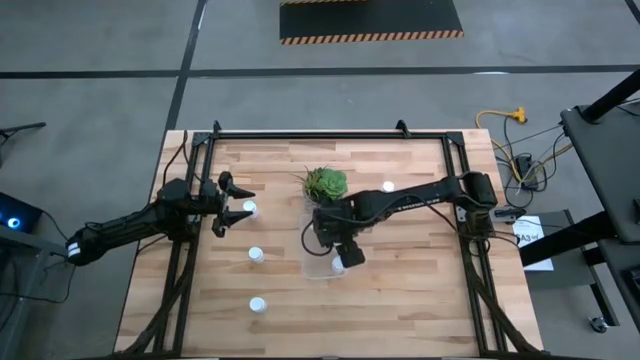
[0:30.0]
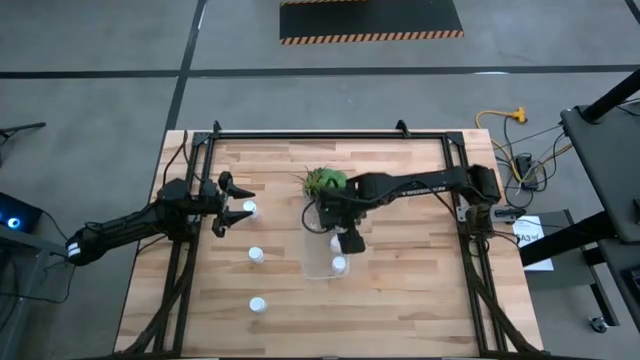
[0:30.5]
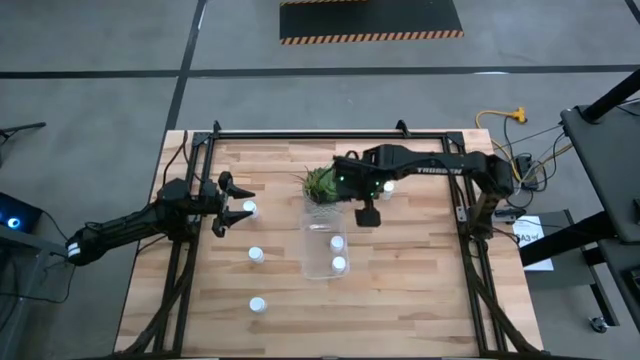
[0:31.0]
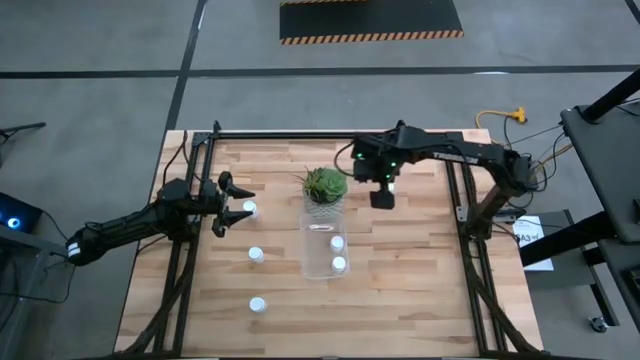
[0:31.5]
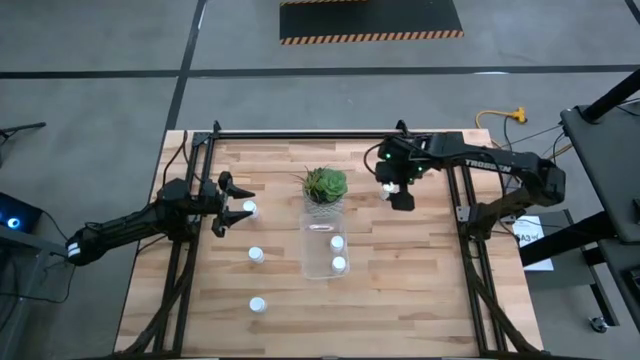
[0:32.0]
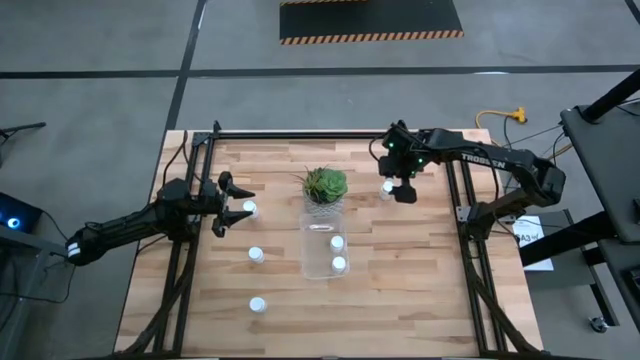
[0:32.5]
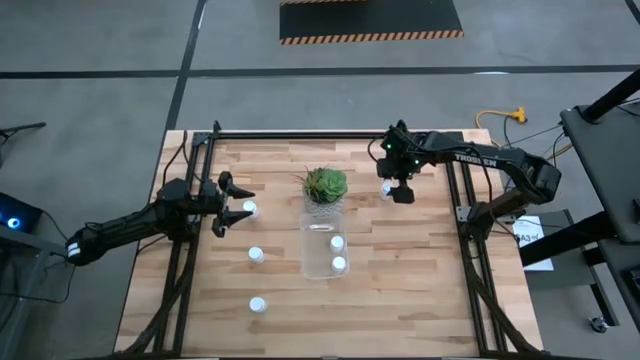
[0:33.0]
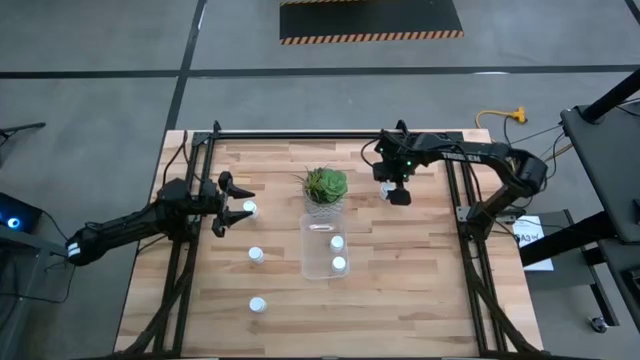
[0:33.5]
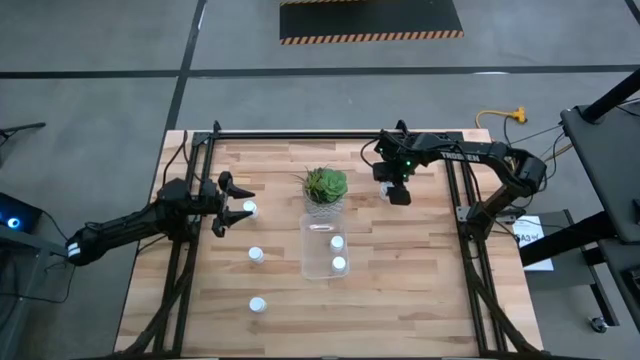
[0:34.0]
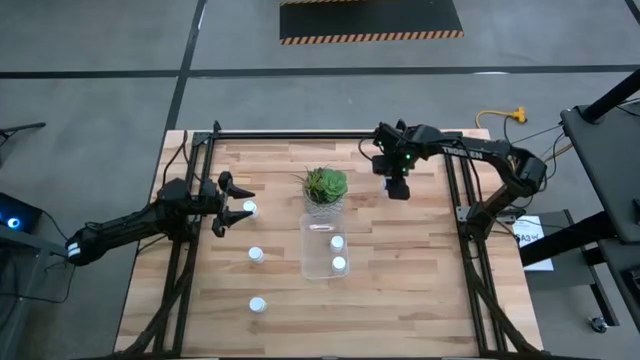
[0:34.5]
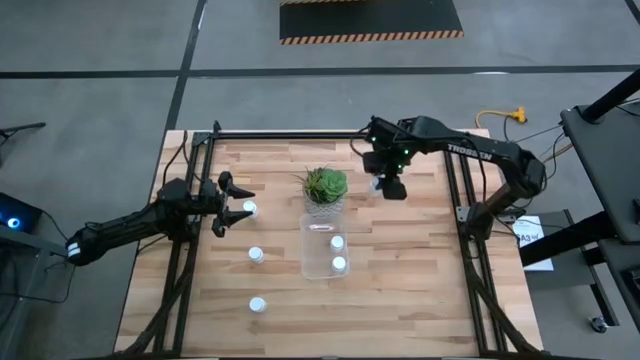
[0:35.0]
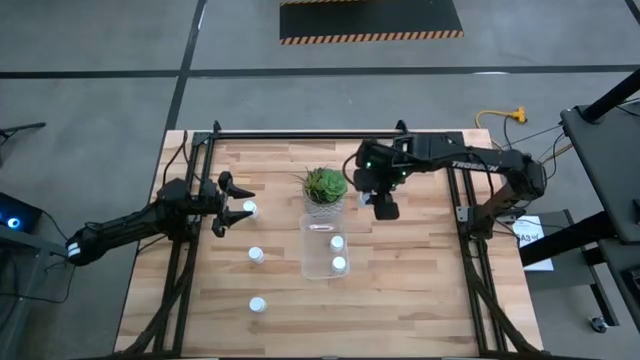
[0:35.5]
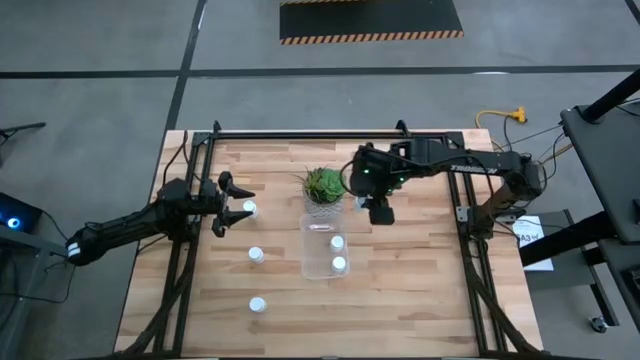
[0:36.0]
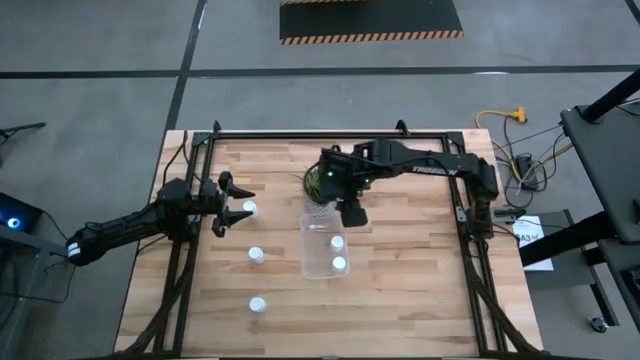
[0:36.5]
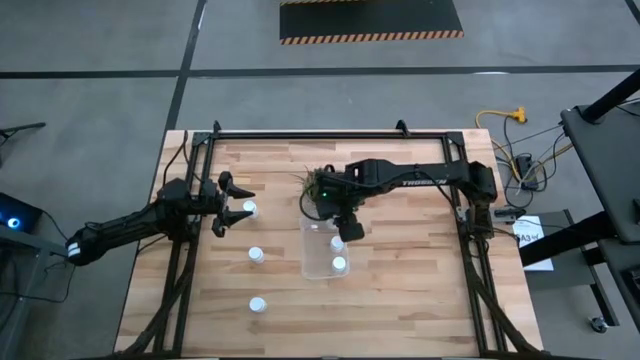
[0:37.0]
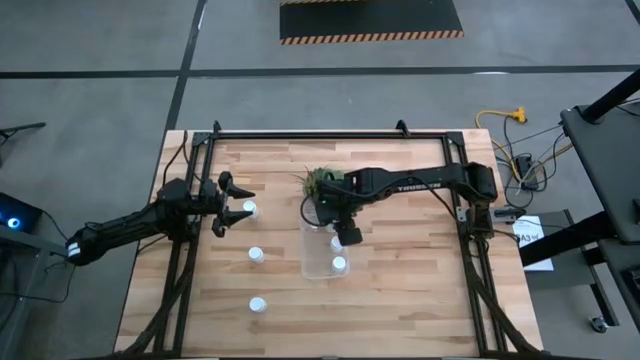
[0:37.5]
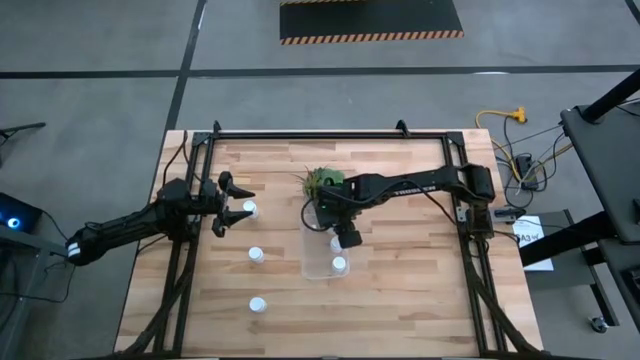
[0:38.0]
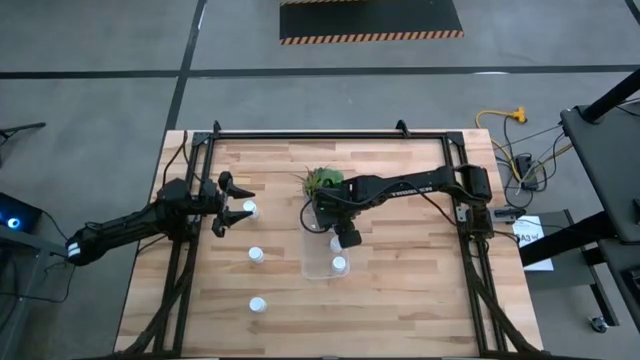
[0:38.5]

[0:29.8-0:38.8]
Task: Pick and place pill bottles into a basket
Put the pill bottle into the bin

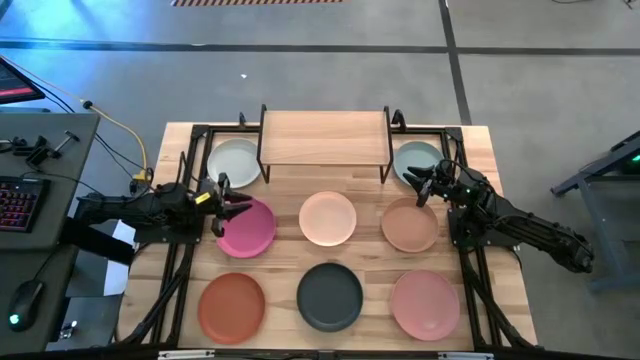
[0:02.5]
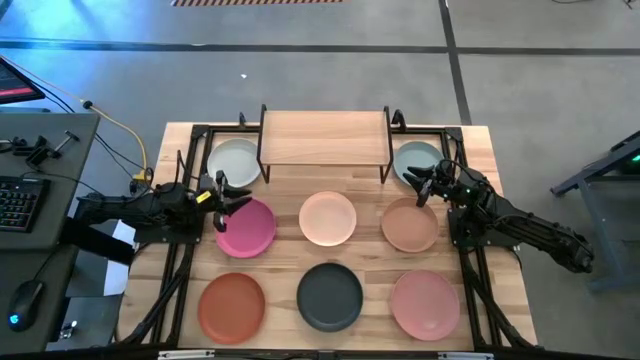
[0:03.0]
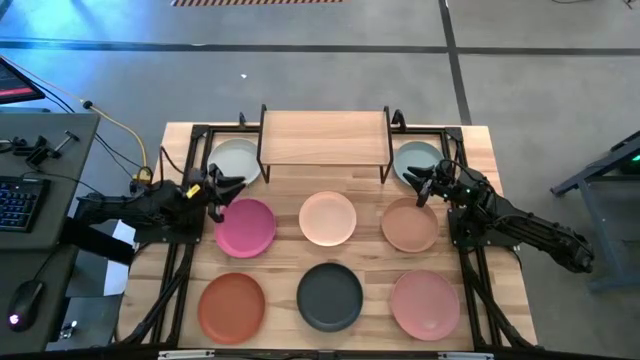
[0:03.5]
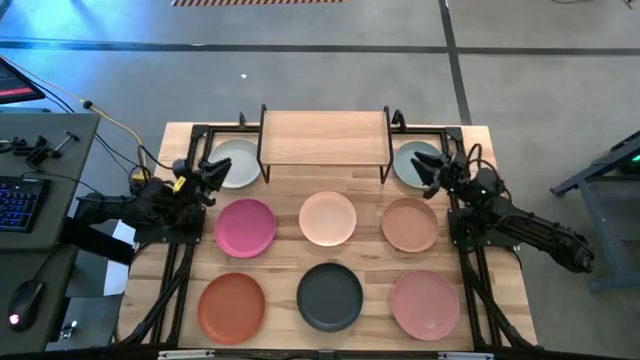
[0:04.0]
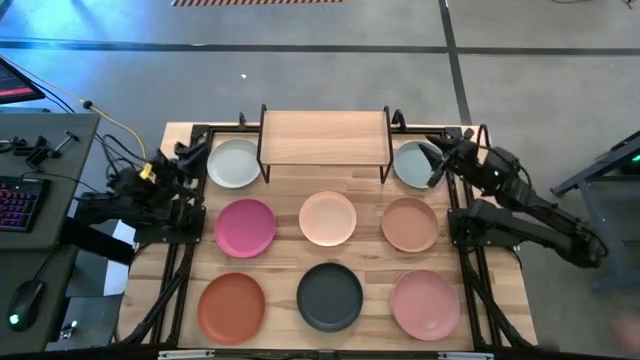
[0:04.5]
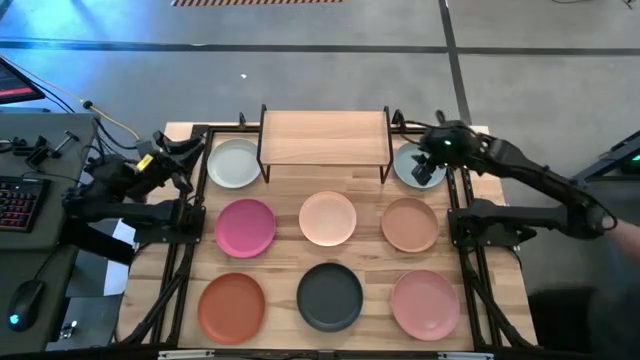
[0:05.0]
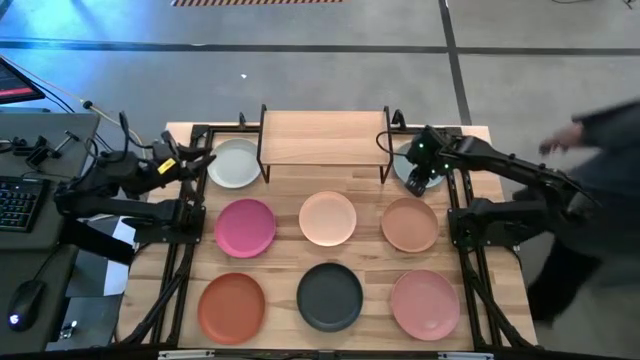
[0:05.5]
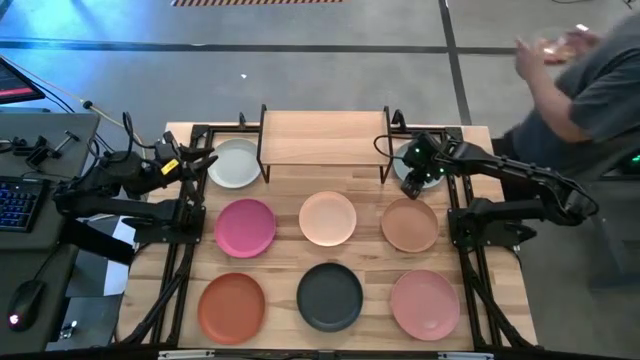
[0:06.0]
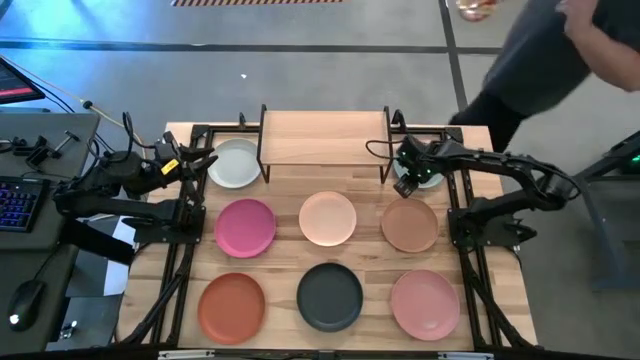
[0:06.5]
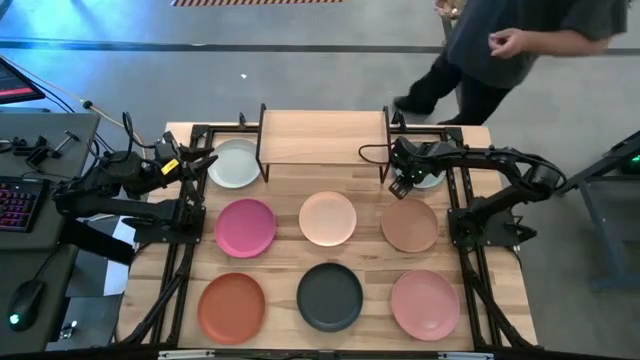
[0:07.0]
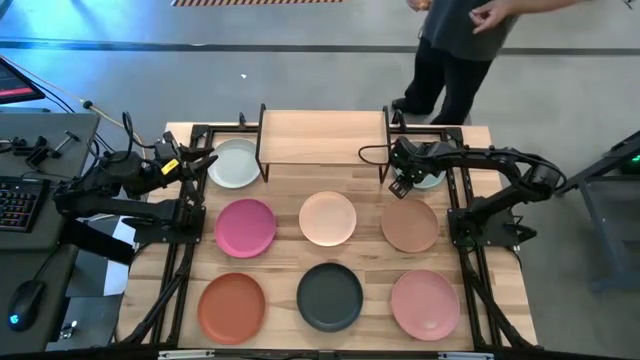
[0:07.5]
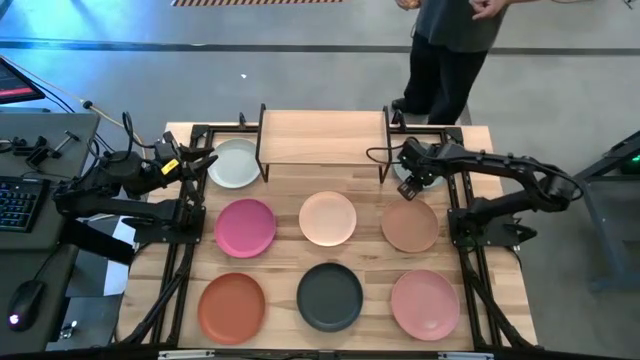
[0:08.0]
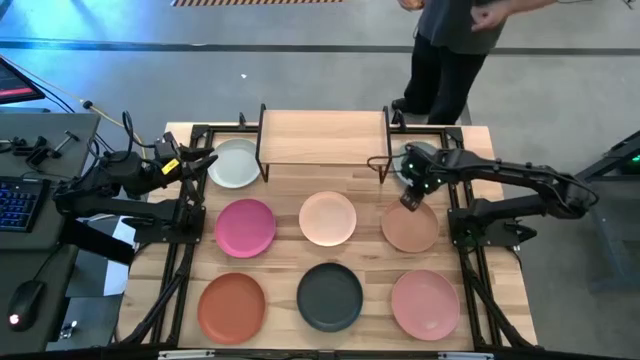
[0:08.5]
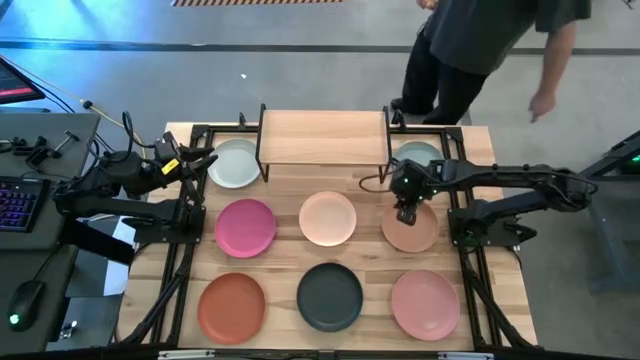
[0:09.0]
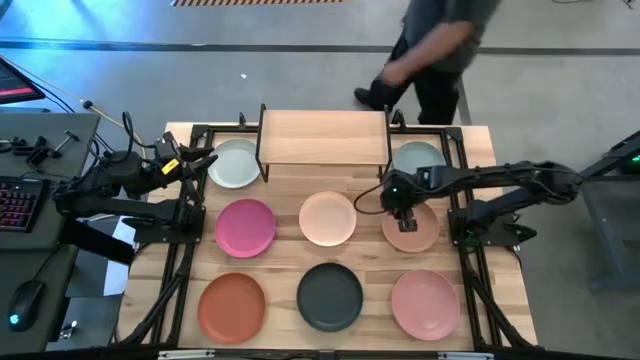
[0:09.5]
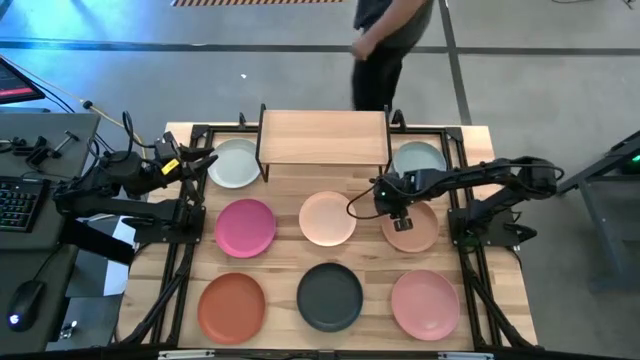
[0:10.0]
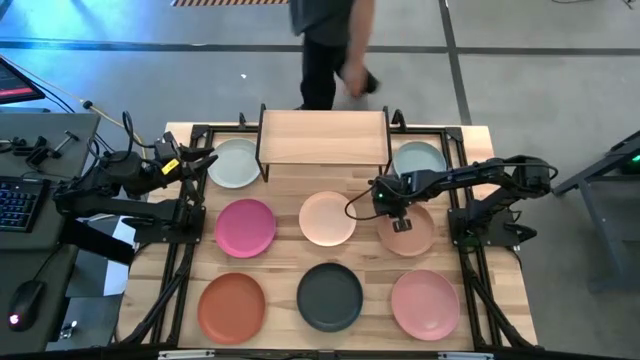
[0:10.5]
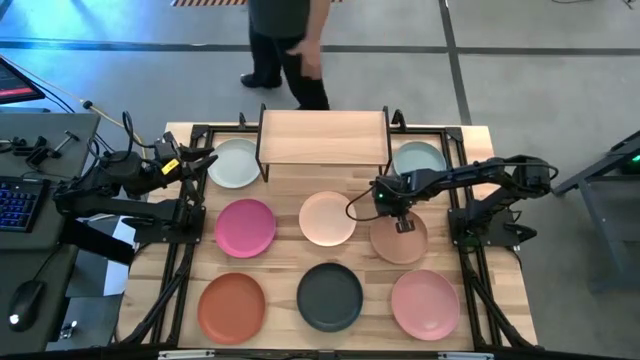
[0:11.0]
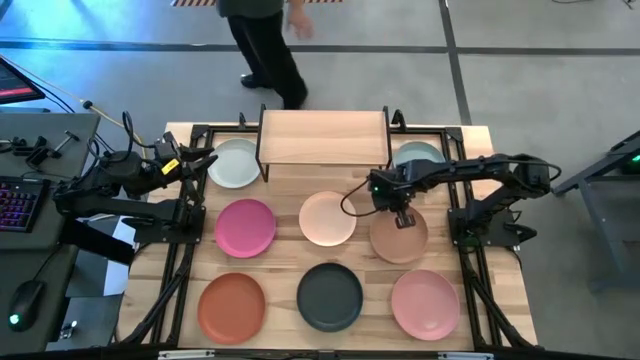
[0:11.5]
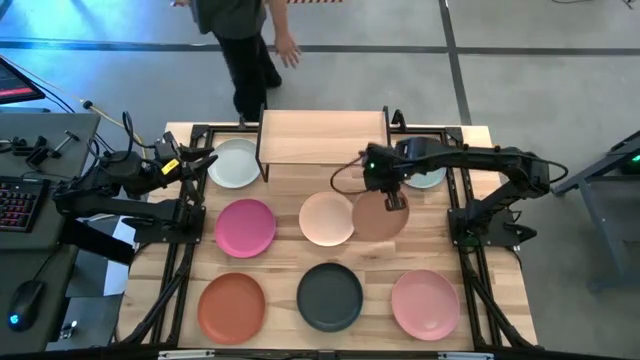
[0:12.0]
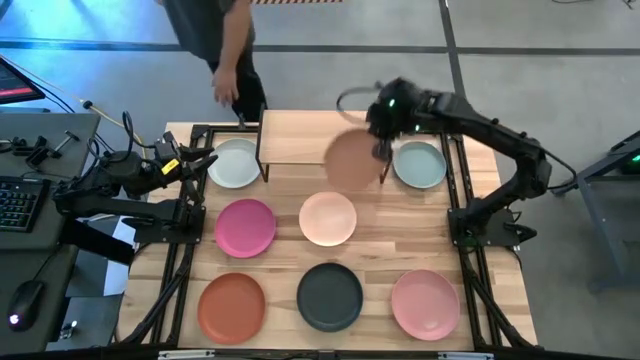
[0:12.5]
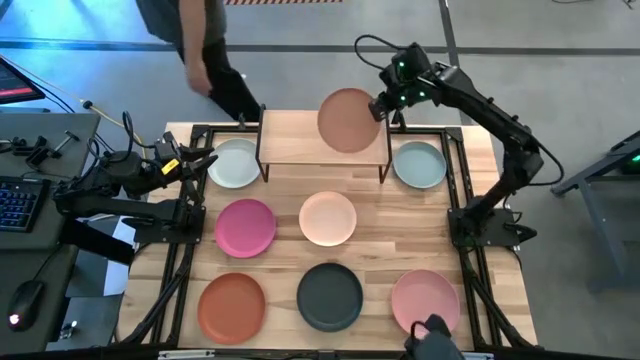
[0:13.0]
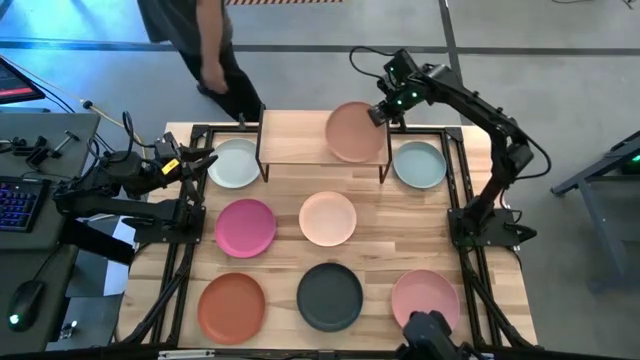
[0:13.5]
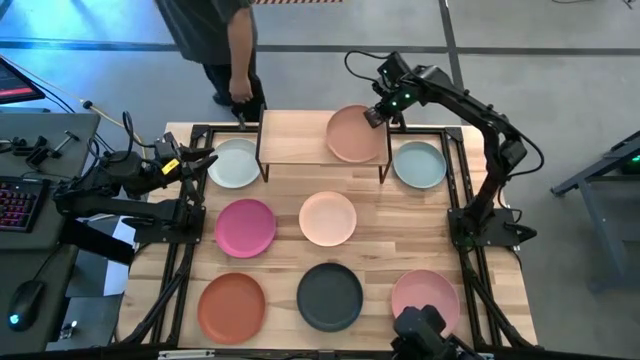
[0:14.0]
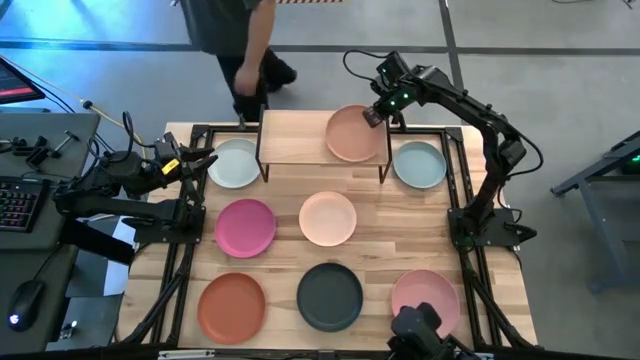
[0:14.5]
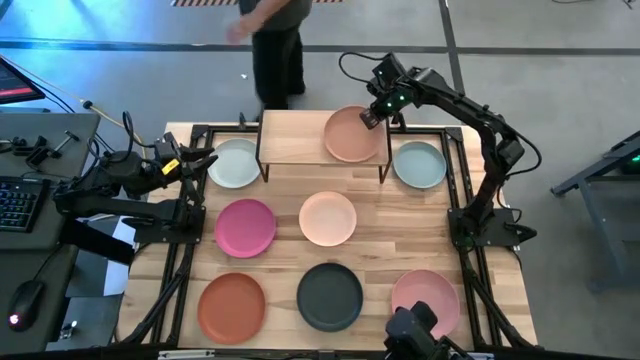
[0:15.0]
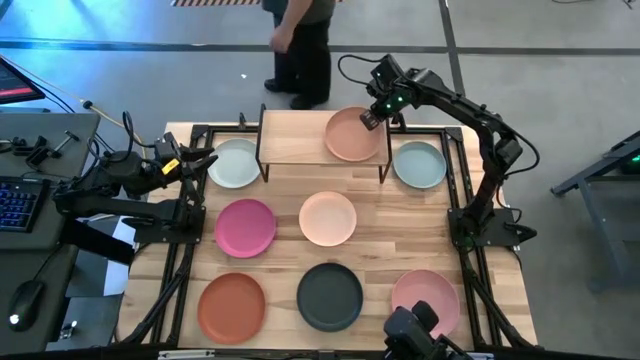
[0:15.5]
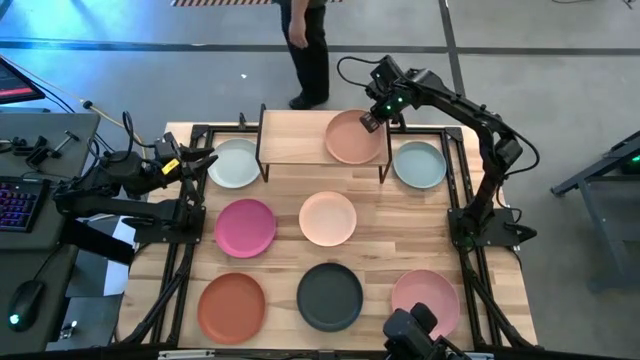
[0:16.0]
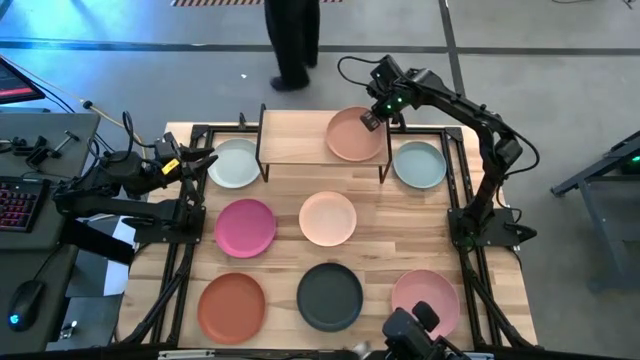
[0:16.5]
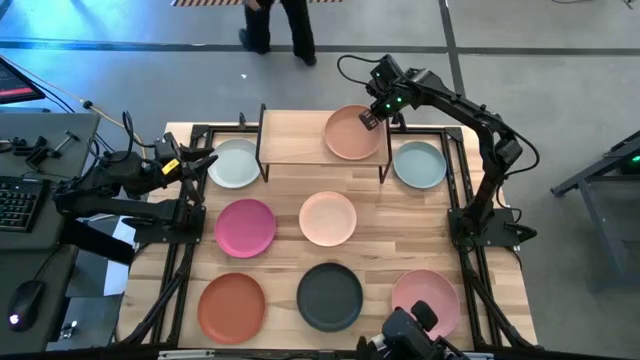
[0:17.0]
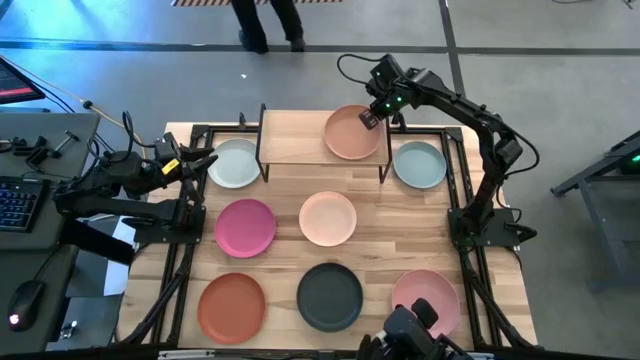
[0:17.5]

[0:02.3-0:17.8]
Task: Place and stack plates onto a shelf
Put the brown plate on the shelf
